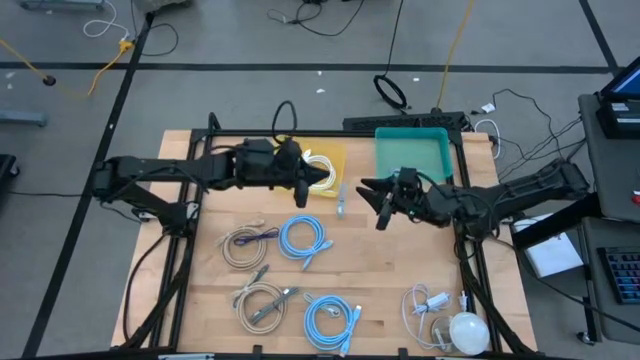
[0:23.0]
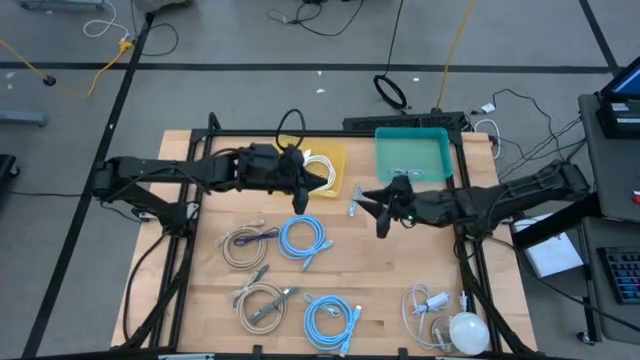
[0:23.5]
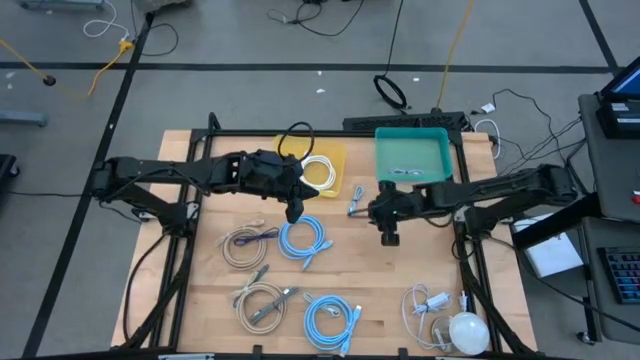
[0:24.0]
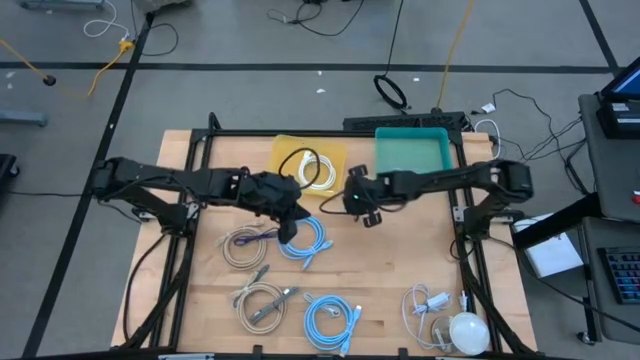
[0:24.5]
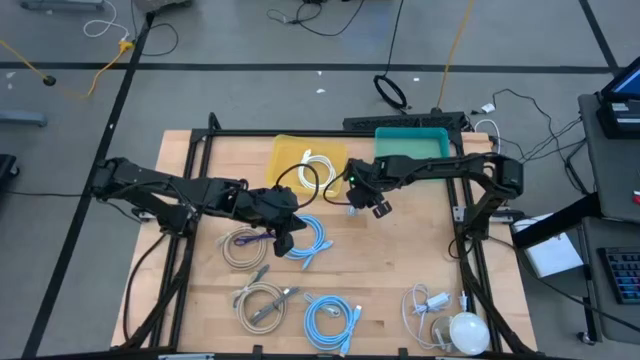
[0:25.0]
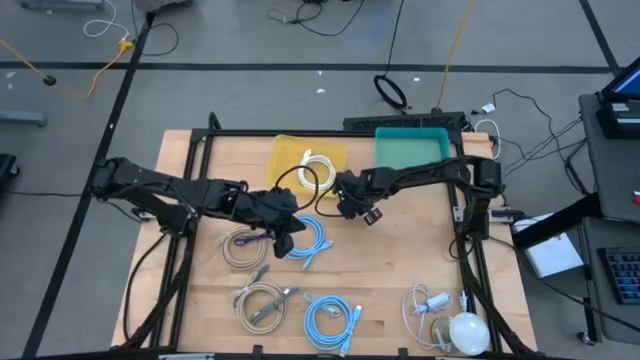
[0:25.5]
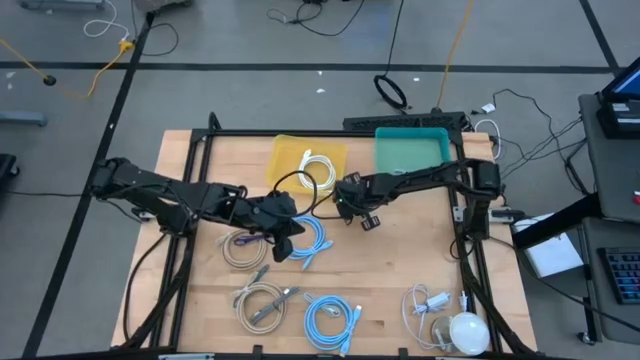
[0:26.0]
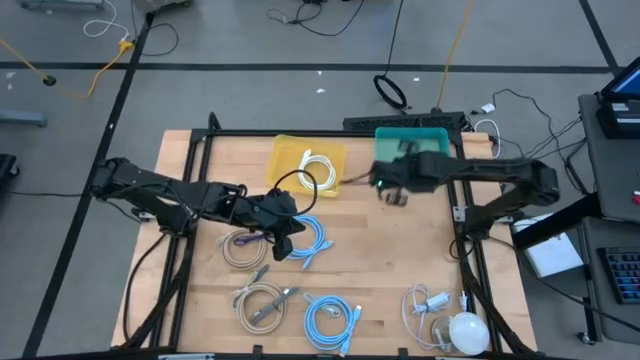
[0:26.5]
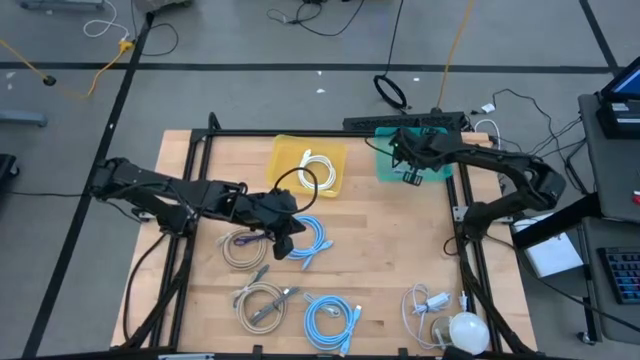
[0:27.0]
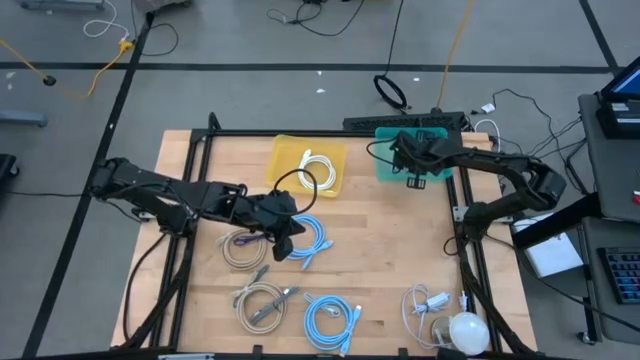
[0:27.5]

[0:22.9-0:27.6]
Task: Pick & Place USB Port
Put the light blue charger cable into the green bin

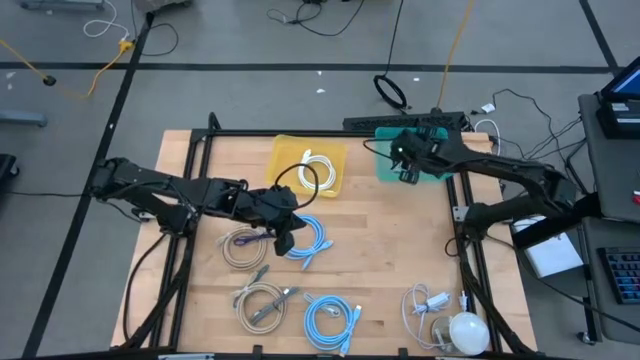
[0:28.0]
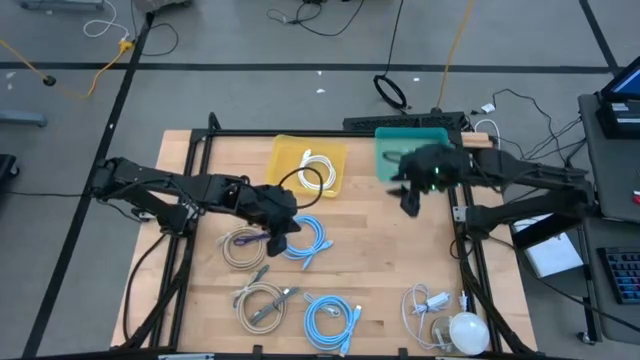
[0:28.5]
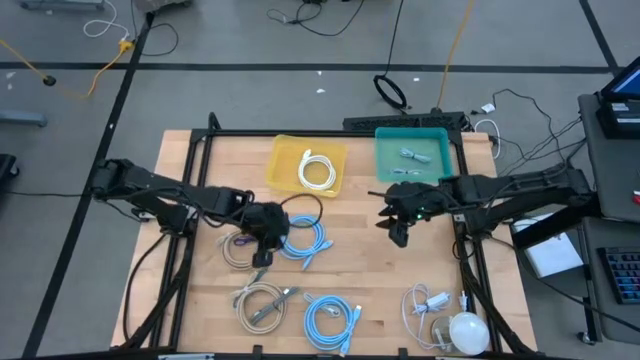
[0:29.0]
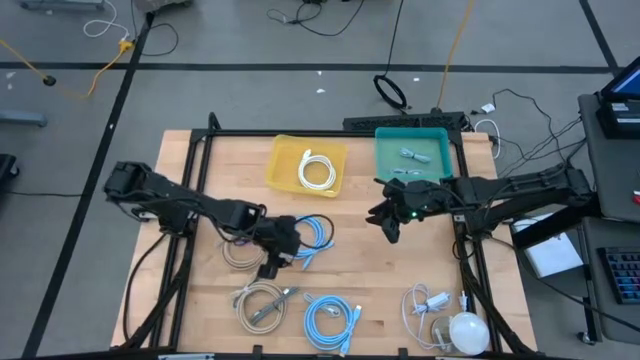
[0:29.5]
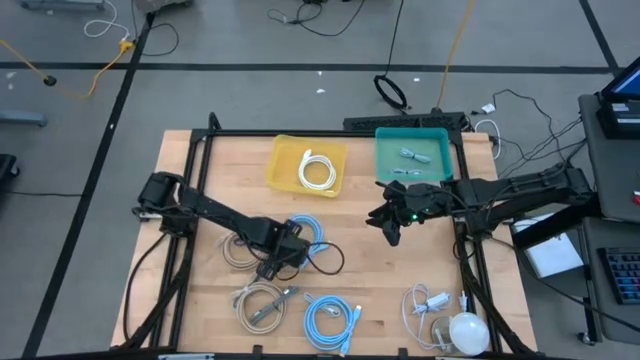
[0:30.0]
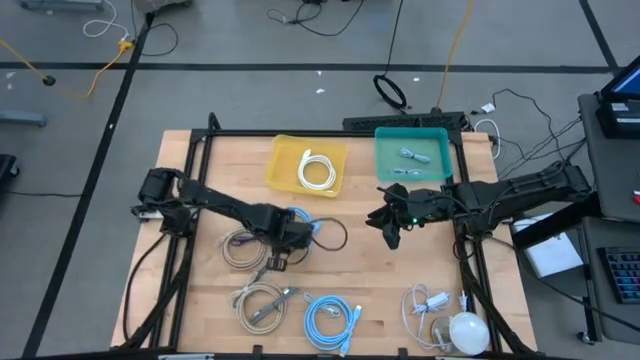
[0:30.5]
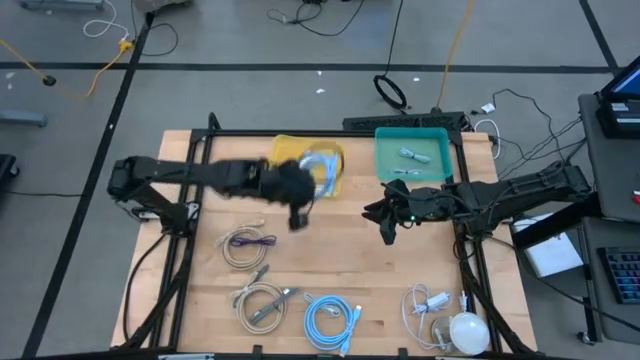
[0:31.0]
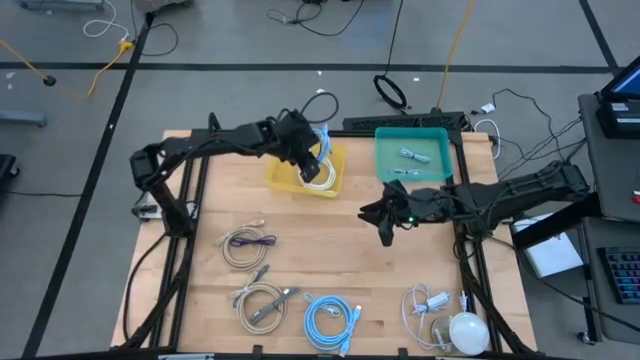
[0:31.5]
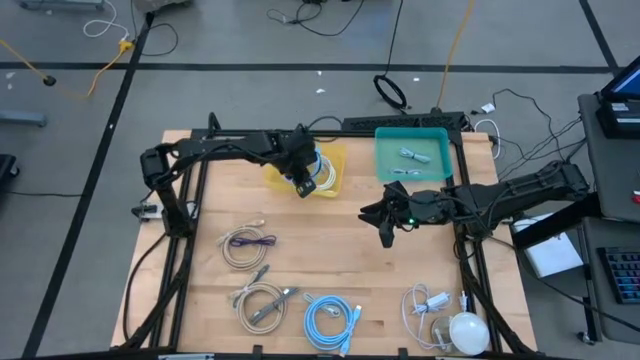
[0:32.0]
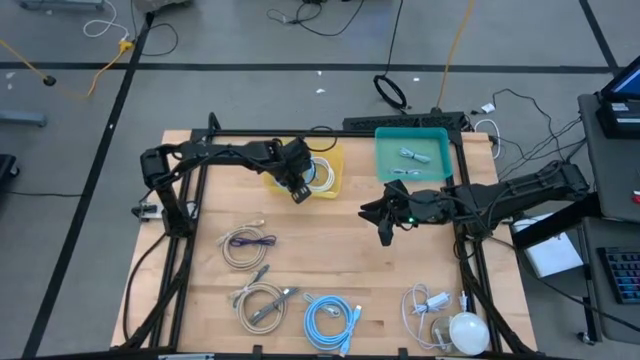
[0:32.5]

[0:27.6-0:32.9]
Put the top blue USB cable into the yellow bin

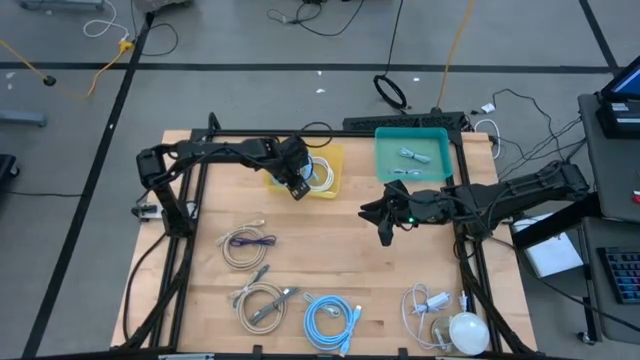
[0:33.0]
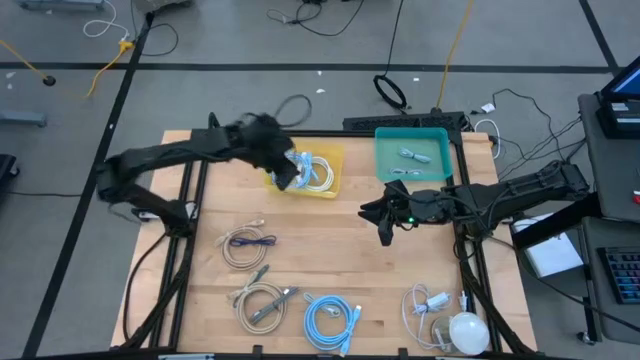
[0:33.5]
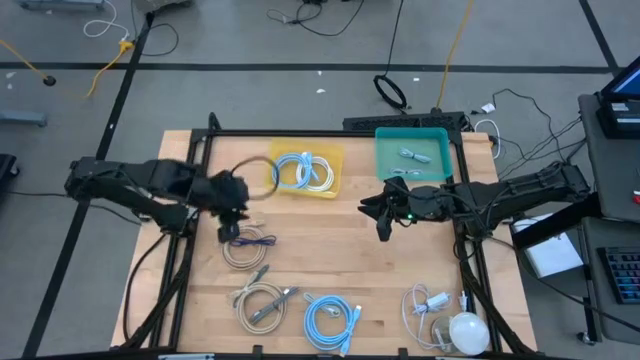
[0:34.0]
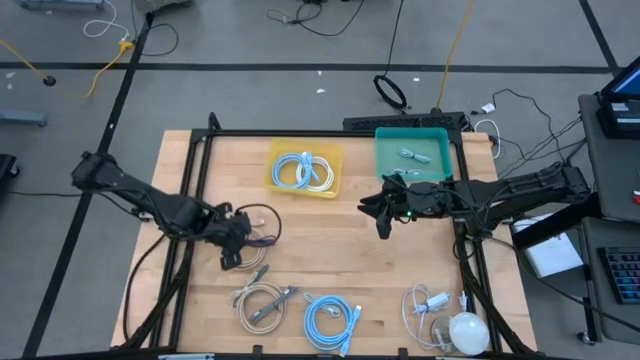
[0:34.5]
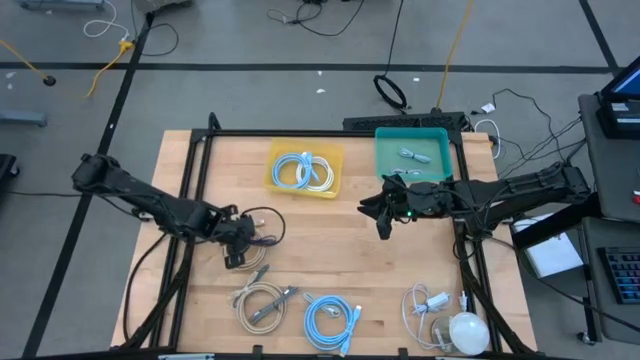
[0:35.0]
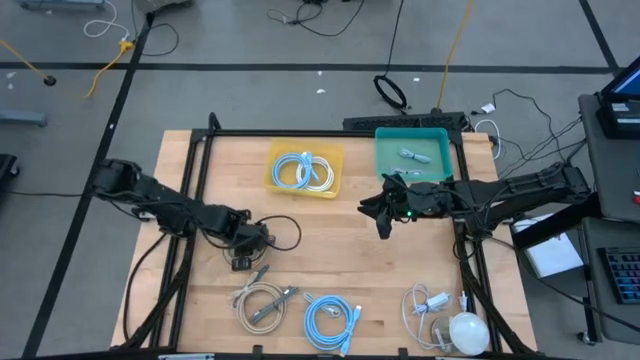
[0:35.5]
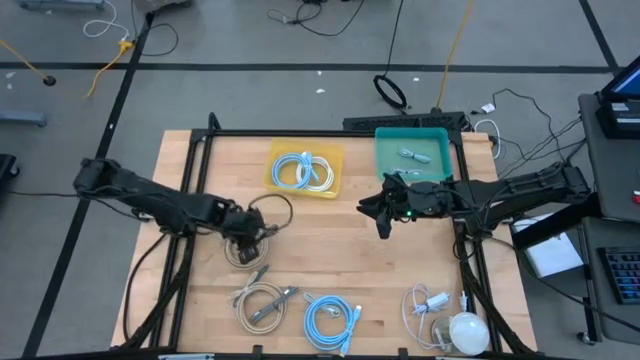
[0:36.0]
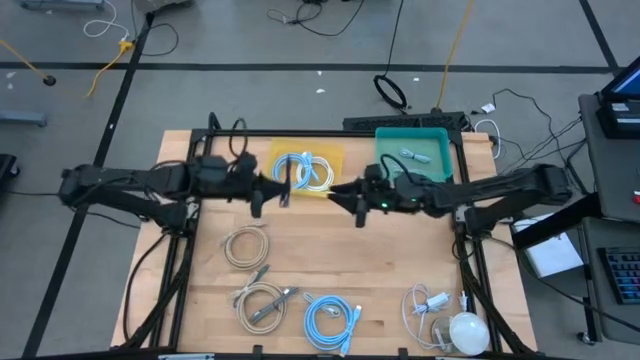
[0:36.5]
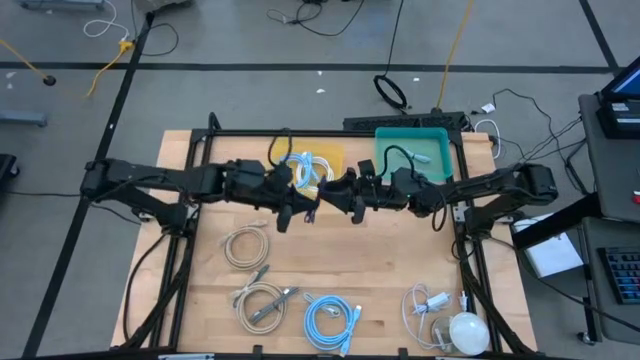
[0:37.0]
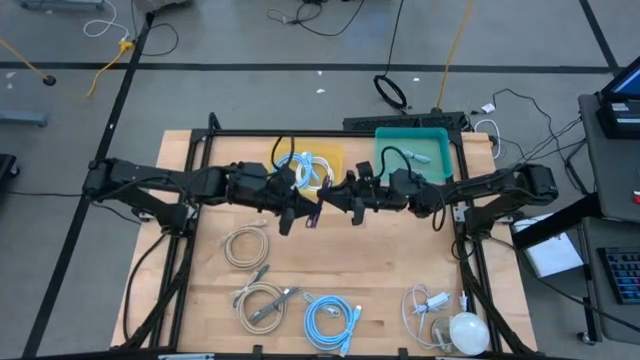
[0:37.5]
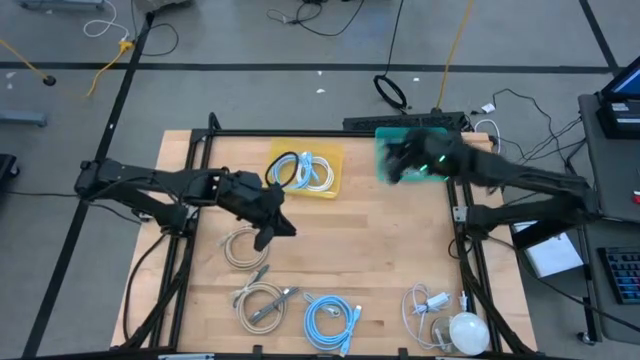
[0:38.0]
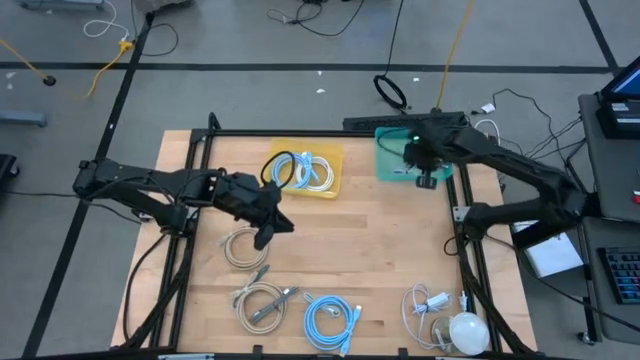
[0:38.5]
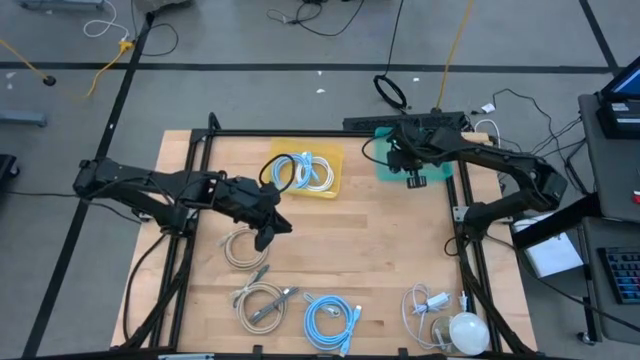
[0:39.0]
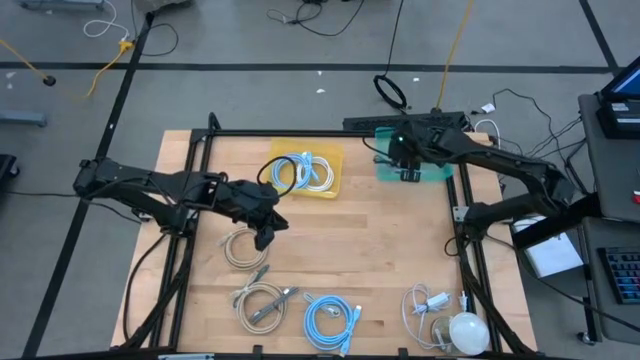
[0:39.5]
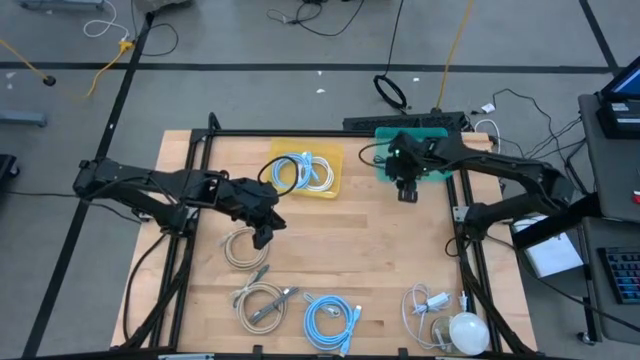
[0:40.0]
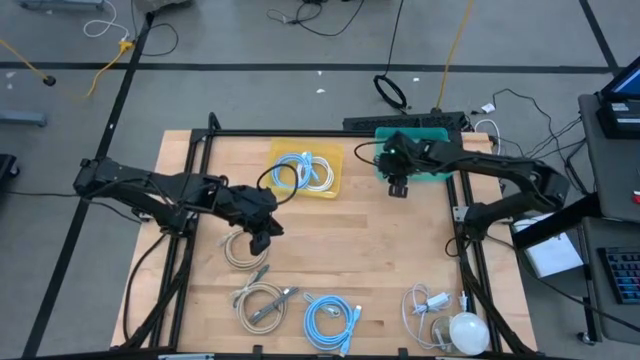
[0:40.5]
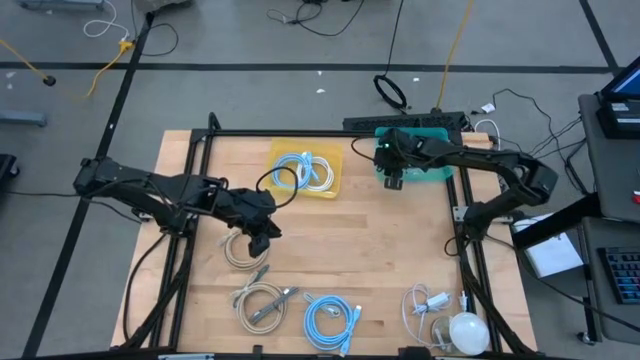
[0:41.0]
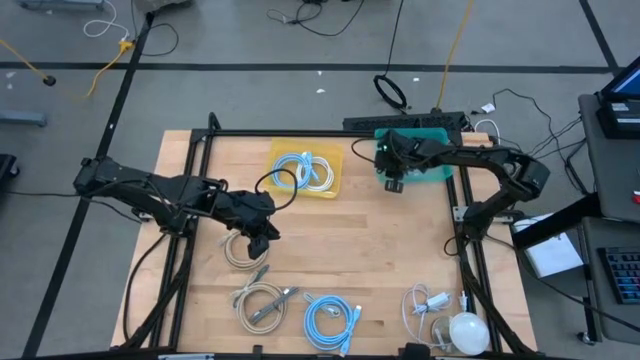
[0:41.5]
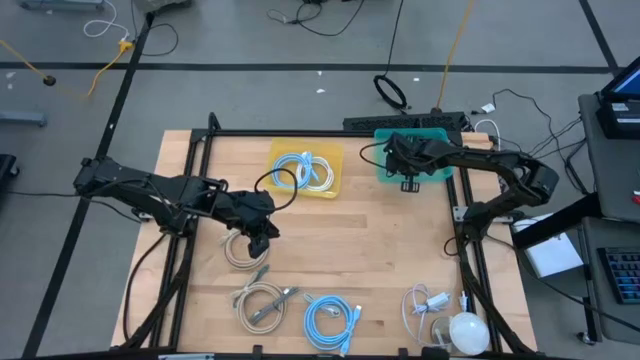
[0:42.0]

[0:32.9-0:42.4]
Put the purple charger cable into the green bin

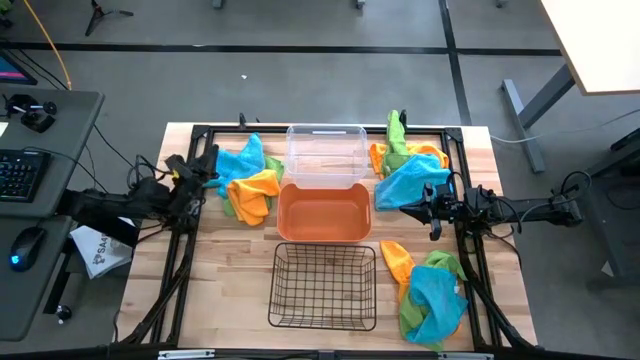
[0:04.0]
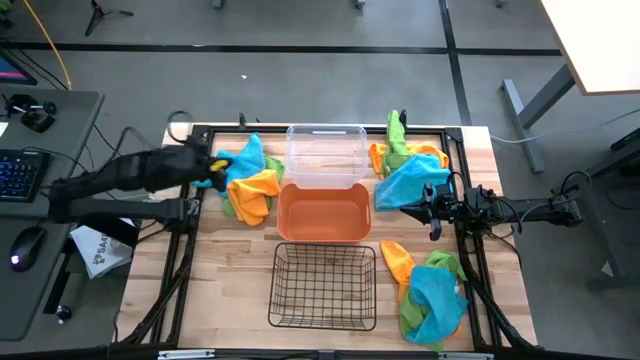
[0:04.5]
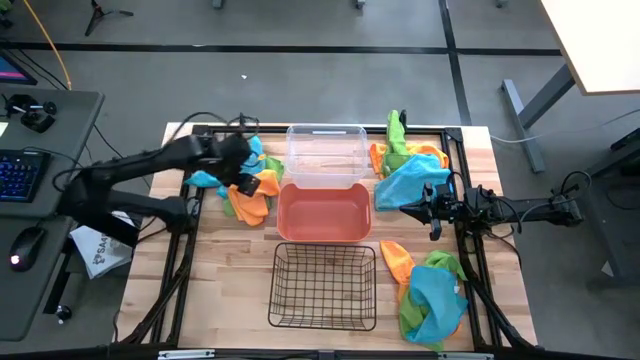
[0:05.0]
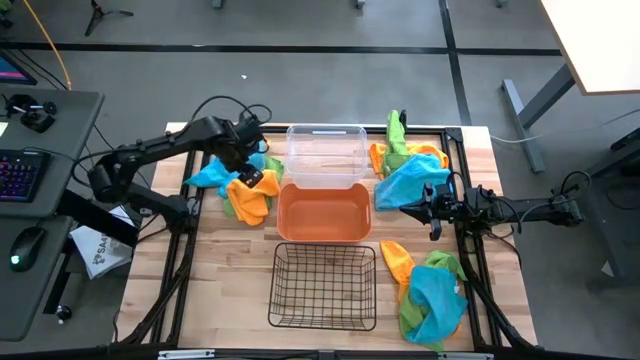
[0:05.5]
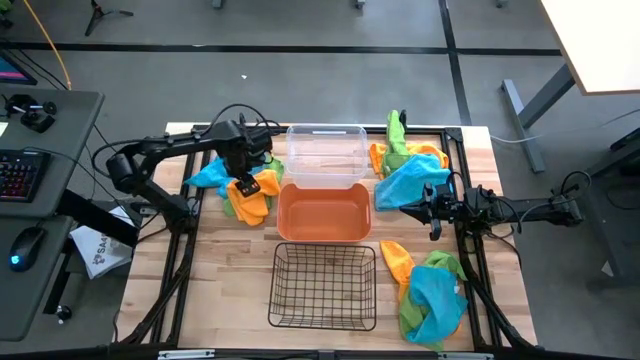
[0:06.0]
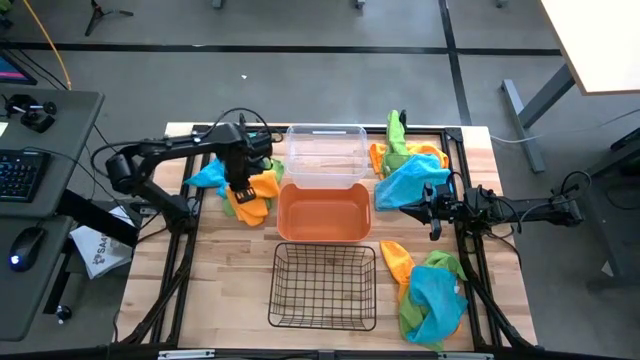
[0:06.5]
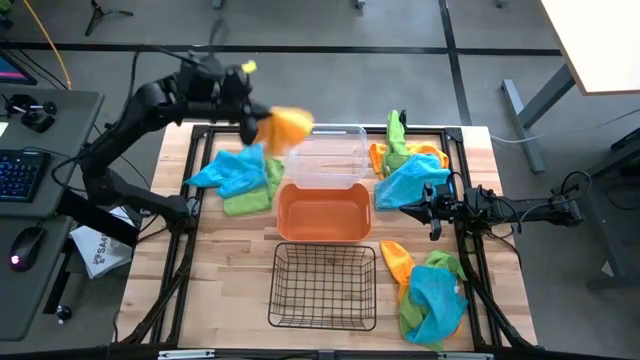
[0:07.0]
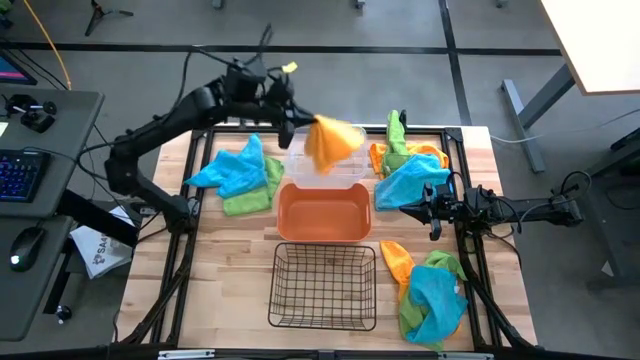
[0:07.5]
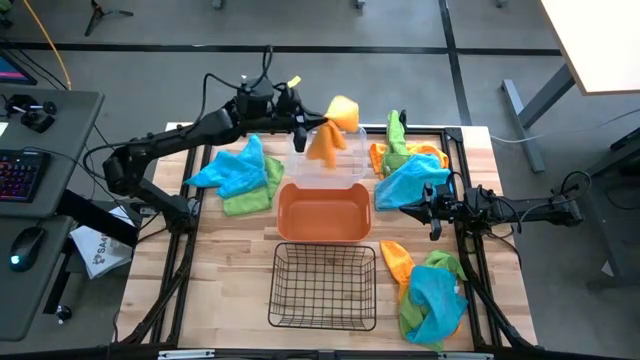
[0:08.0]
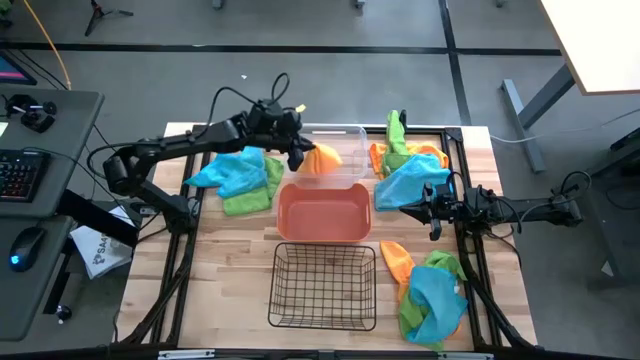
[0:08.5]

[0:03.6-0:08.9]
Task: Sort microfiber towel by color & place in baskets
Put the top left orange towel into the transparent bin
